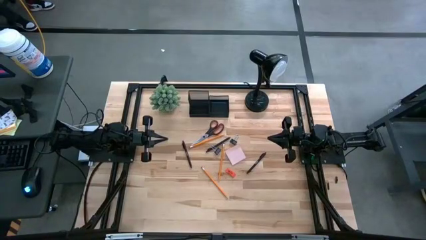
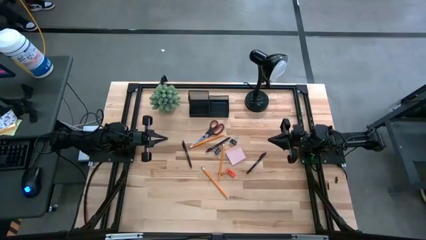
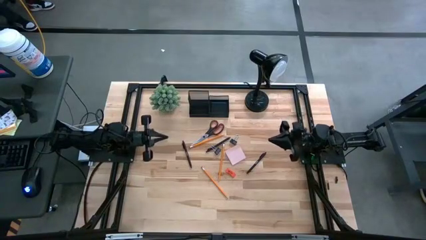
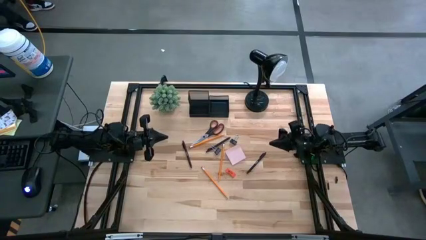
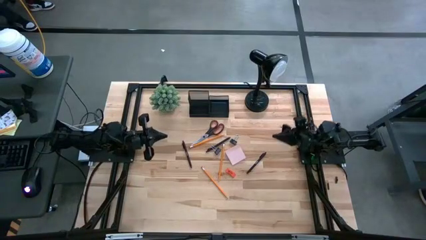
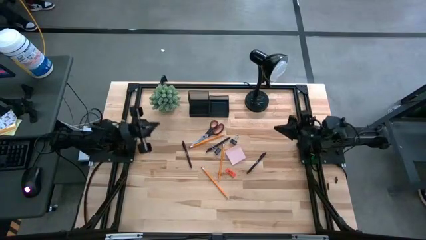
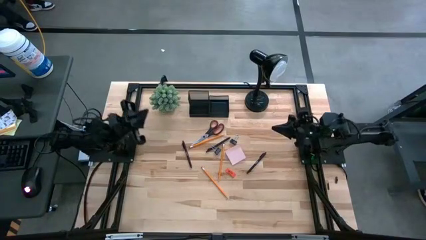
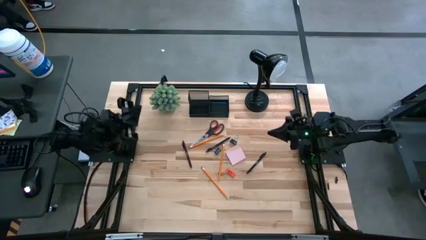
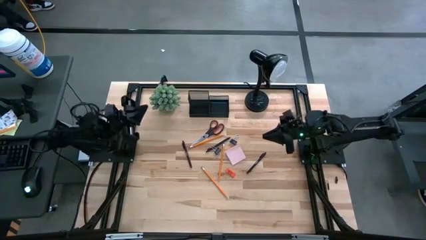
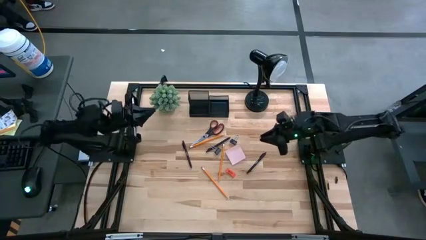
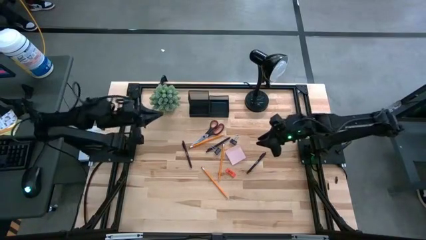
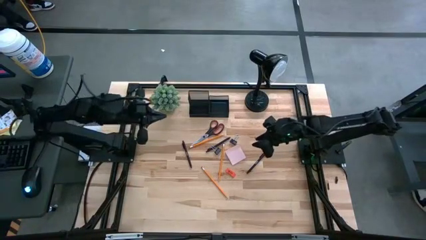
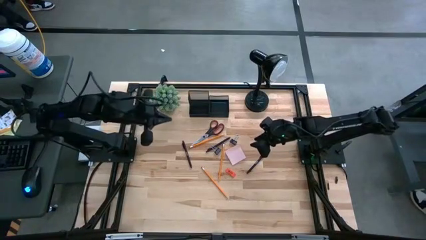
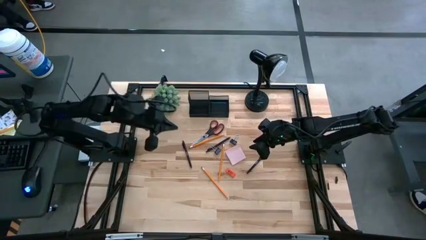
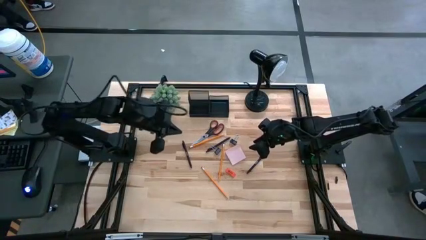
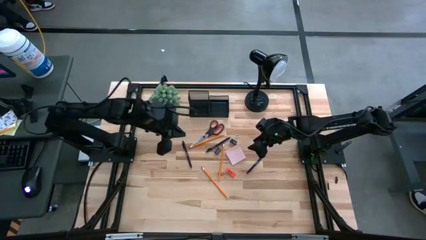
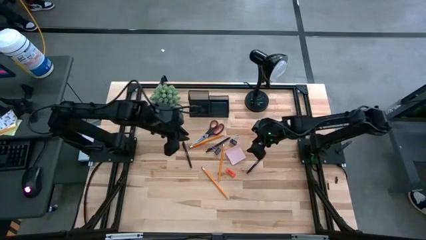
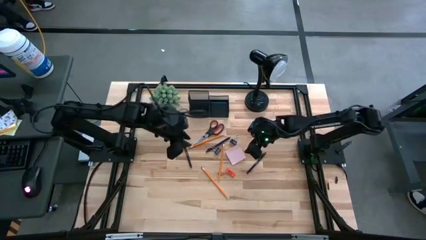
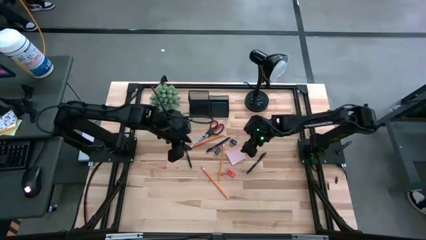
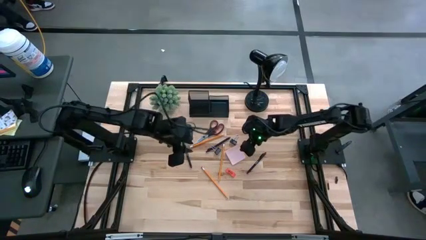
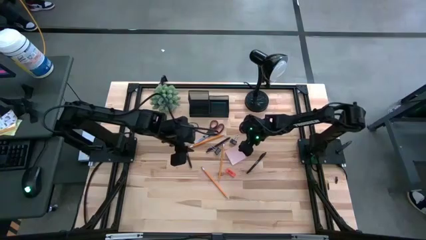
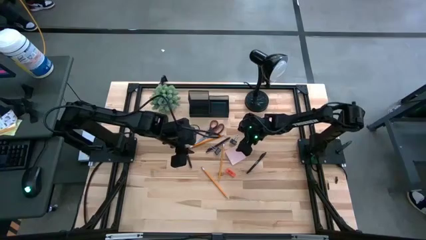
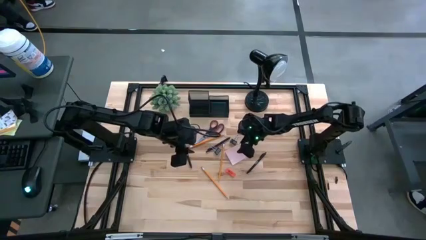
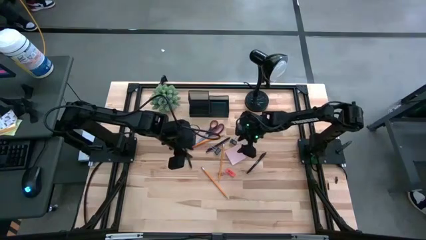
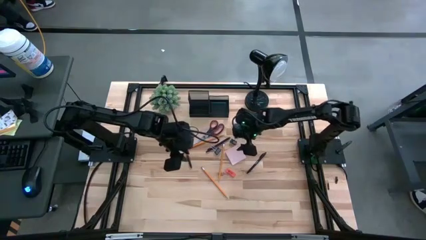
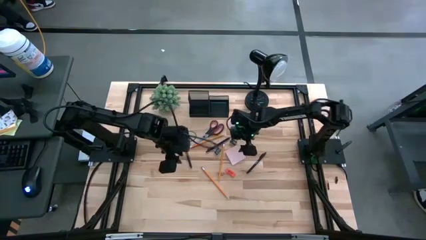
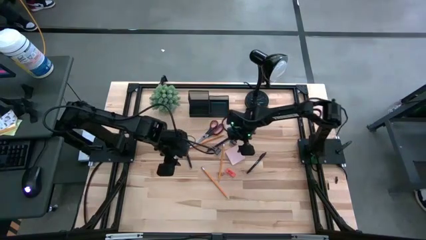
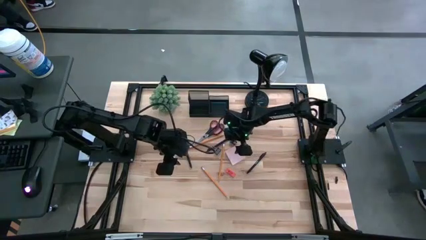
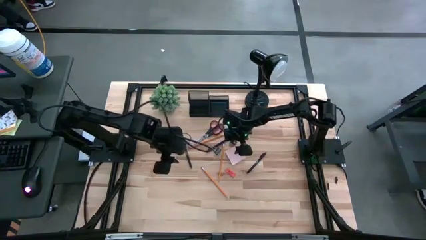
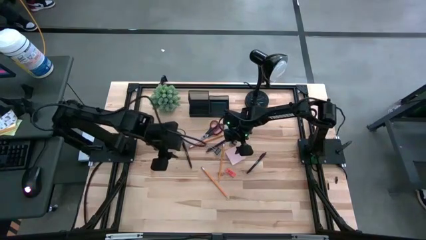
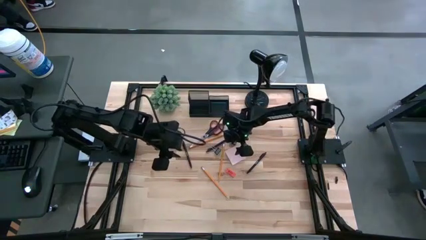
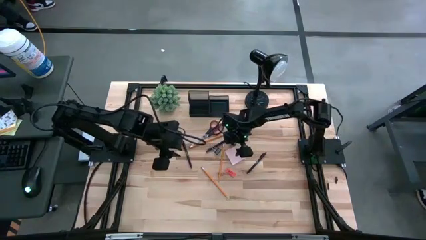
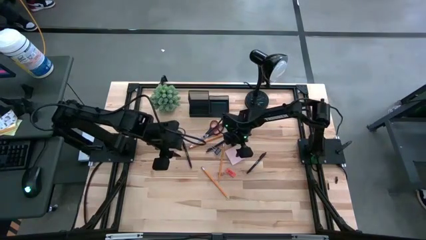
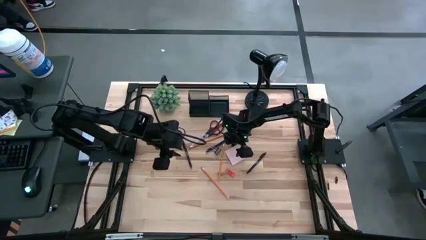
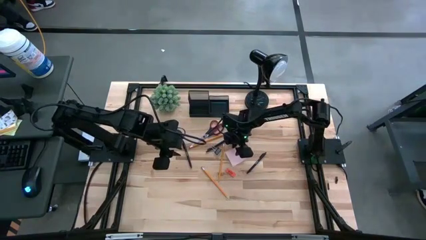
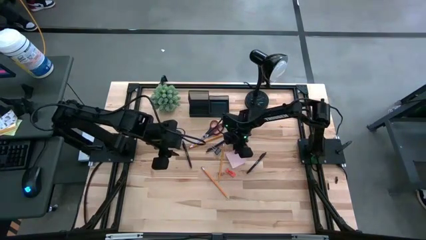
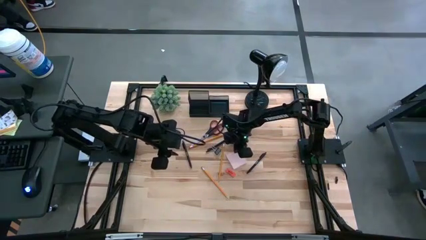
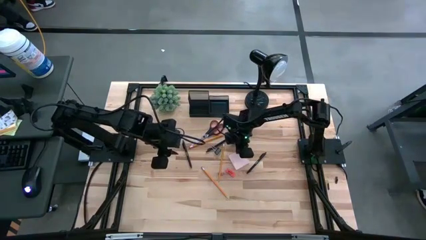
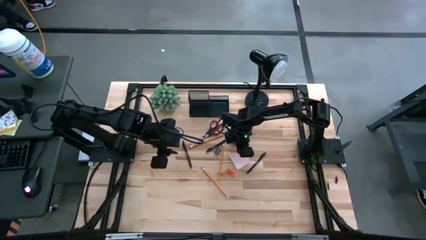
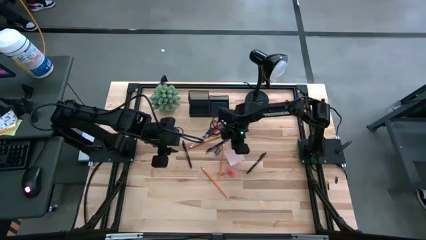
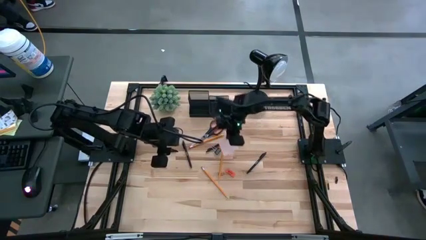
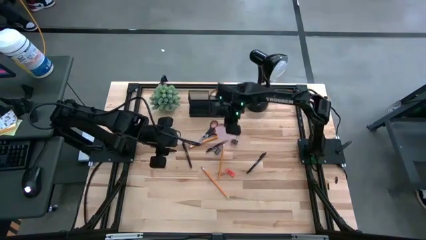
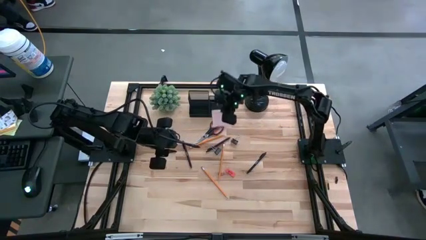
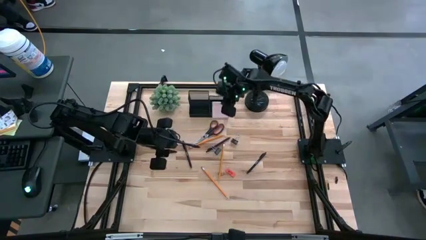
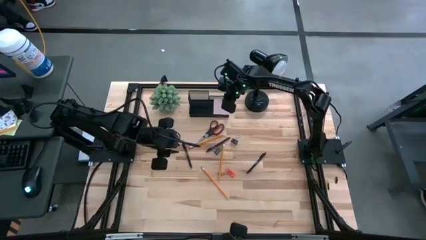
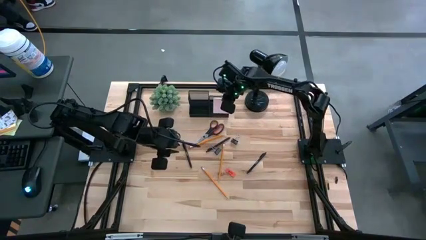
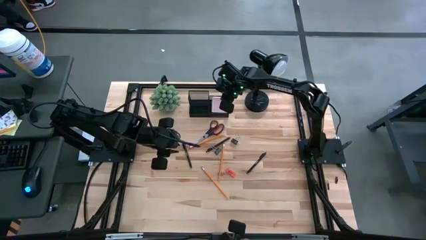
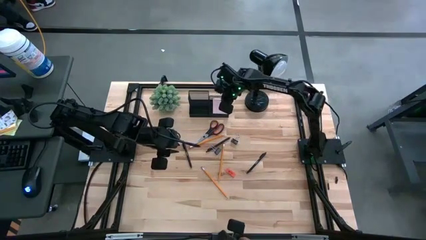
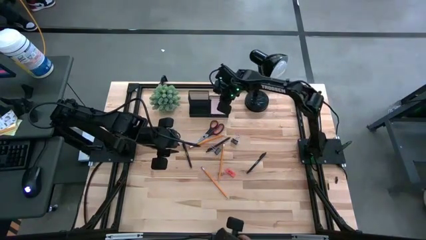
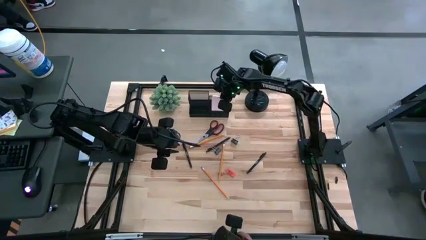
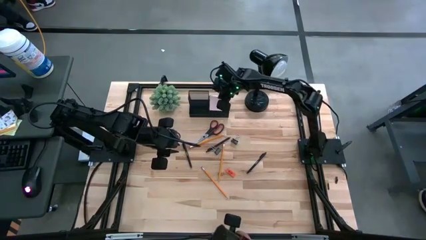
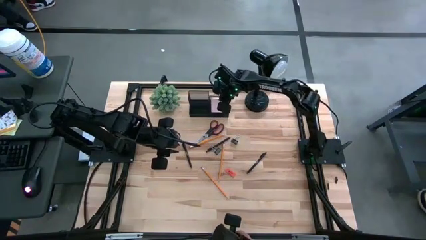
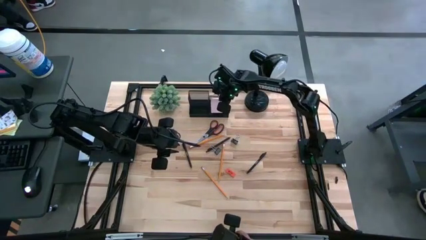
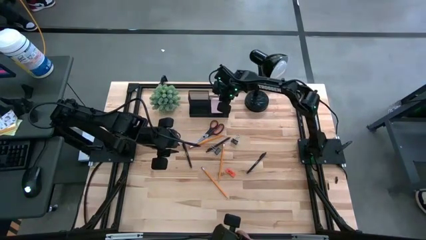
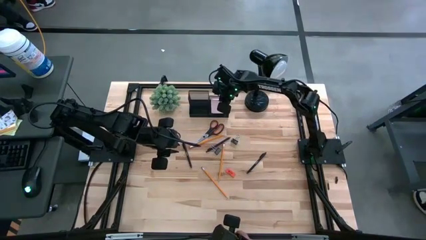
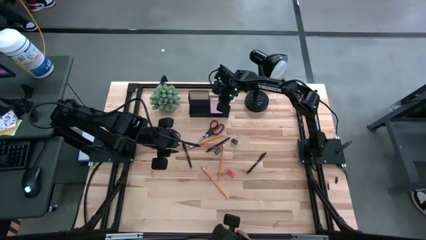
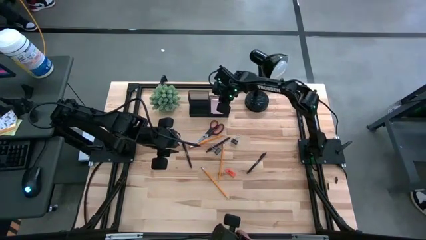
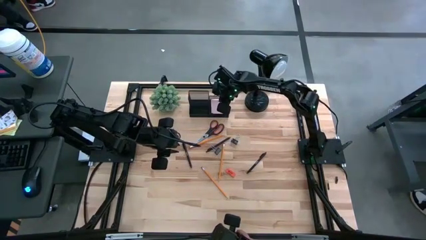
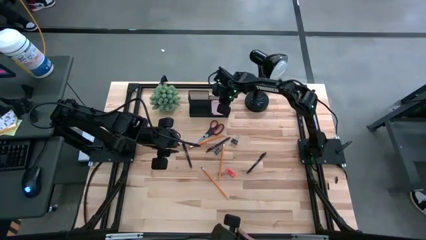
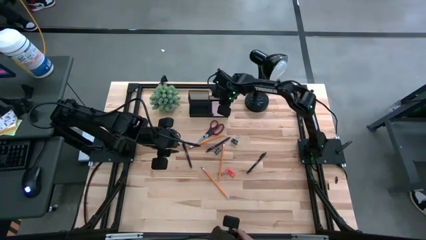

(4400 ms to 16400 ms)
Task: Pick and place office supplies into organizer
Put the pink sticky notes into the black desk organizer
